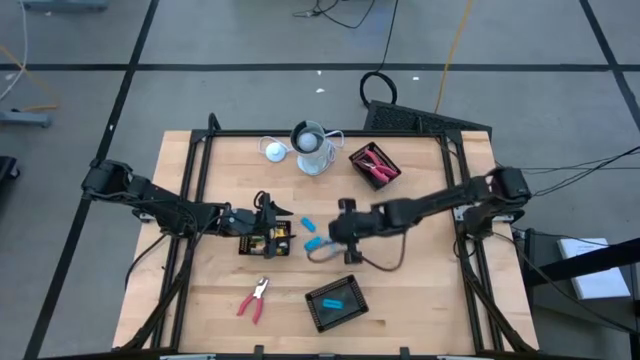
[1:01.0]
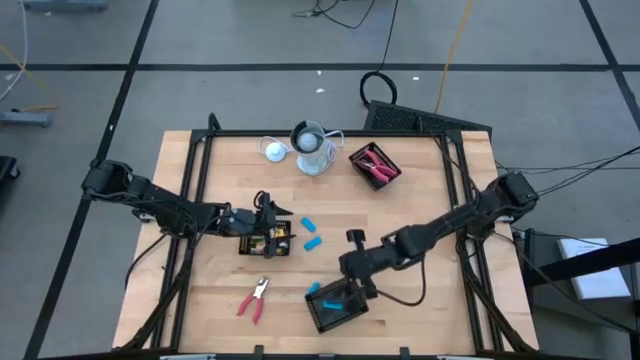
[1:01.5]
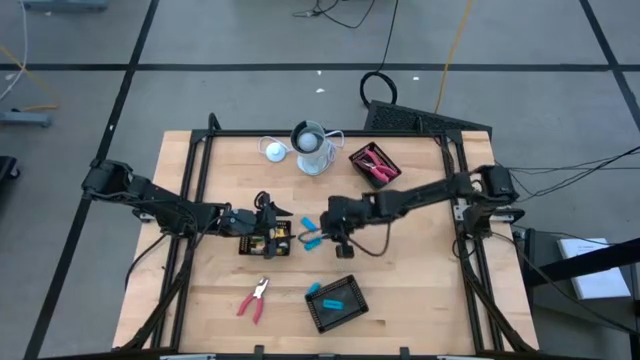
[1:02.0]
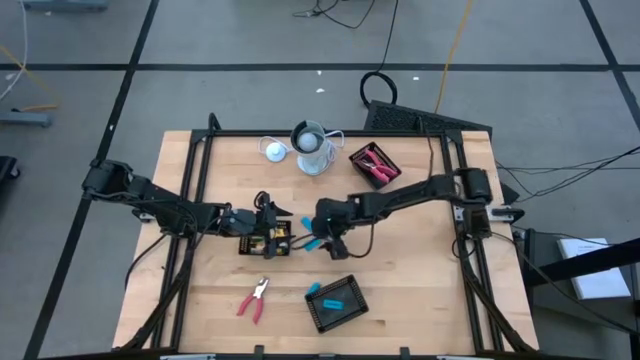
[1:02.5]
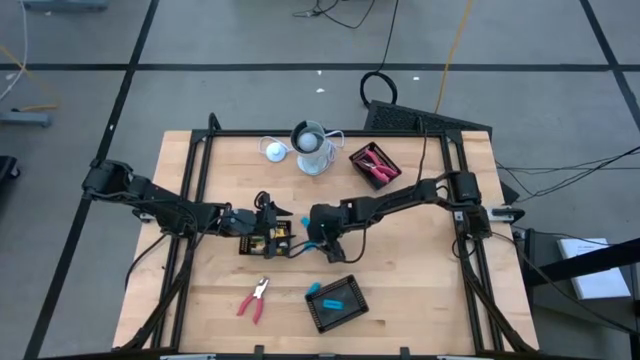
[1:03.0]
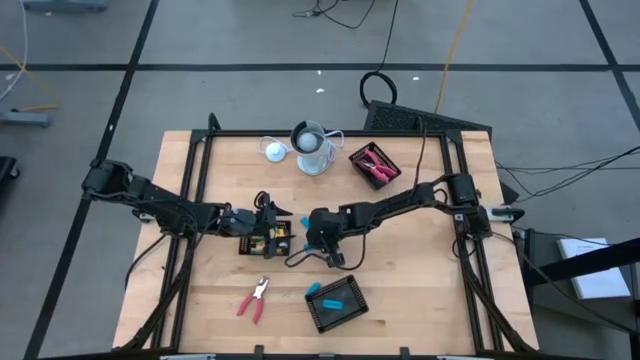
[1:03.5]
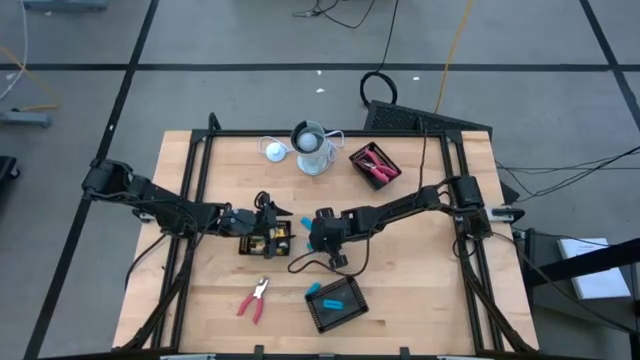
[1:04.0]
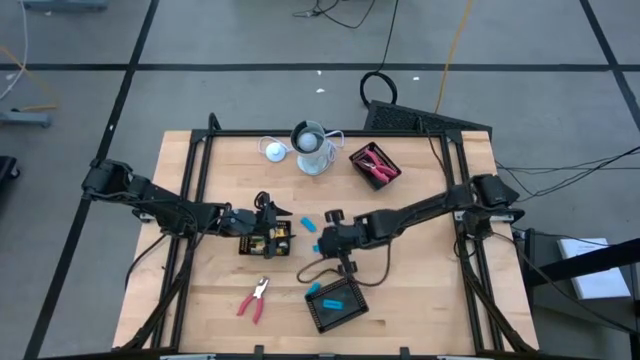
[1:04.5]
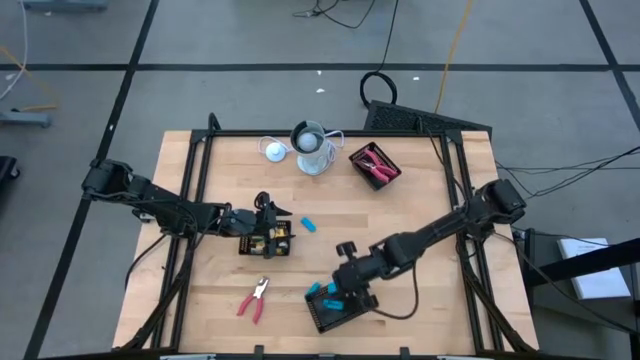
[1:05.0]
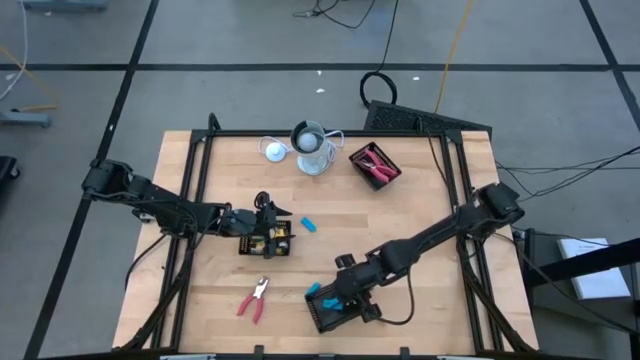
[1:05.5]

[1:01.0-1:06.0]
Task: Pick & Place School Supplies
Put the blue eraser into the bottom black bin

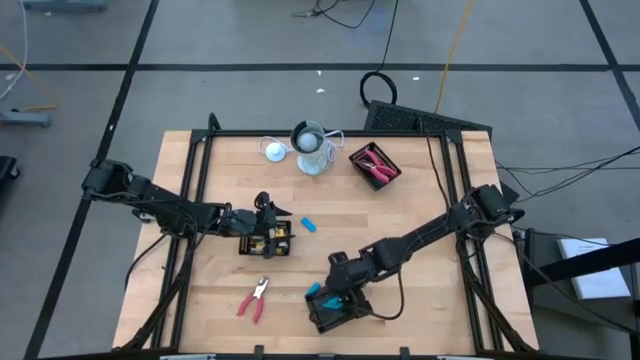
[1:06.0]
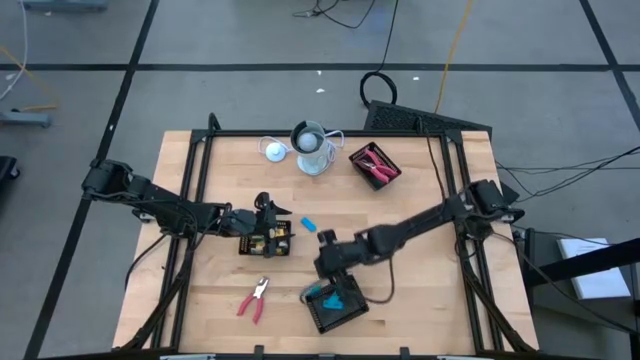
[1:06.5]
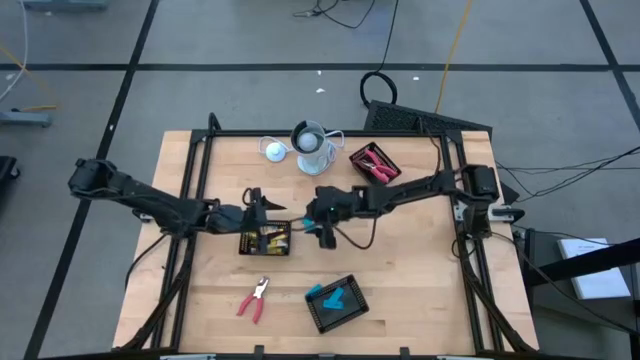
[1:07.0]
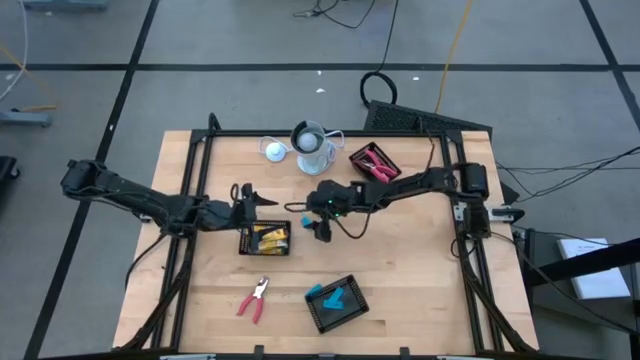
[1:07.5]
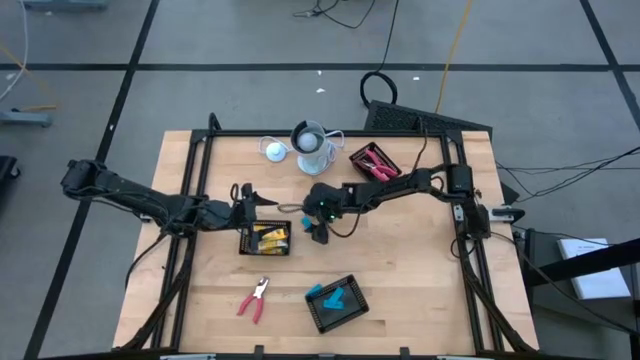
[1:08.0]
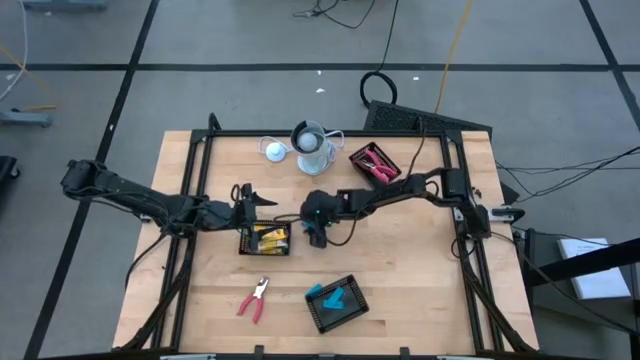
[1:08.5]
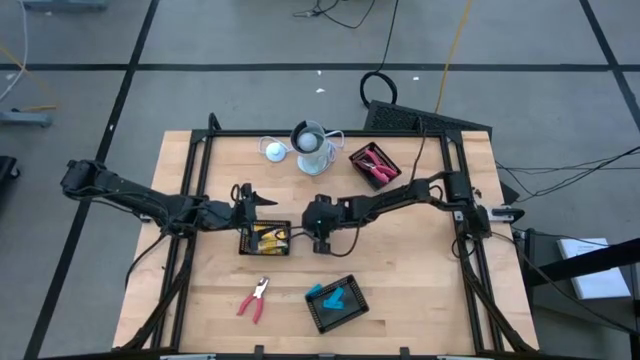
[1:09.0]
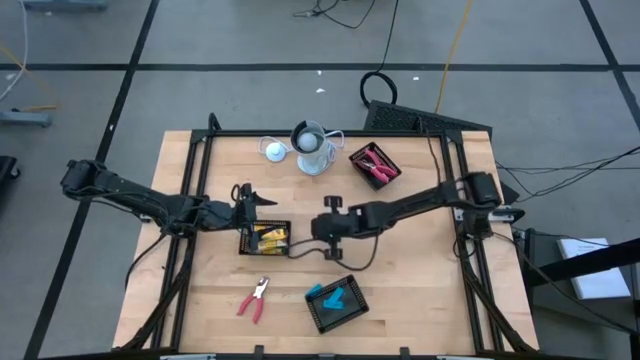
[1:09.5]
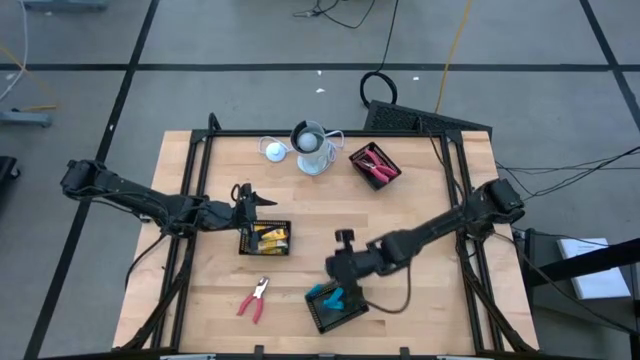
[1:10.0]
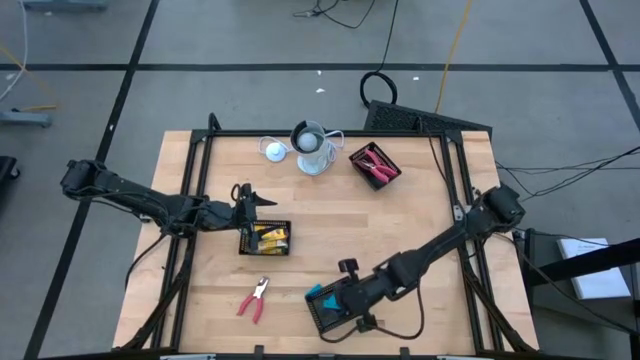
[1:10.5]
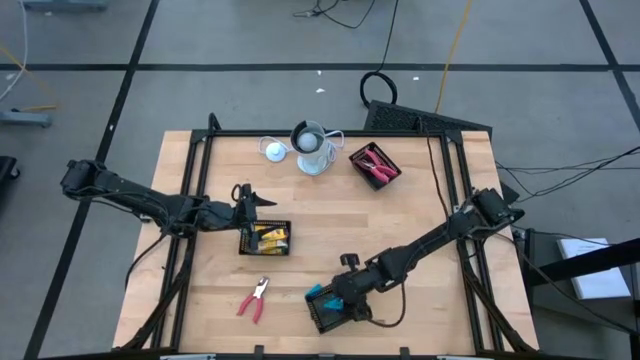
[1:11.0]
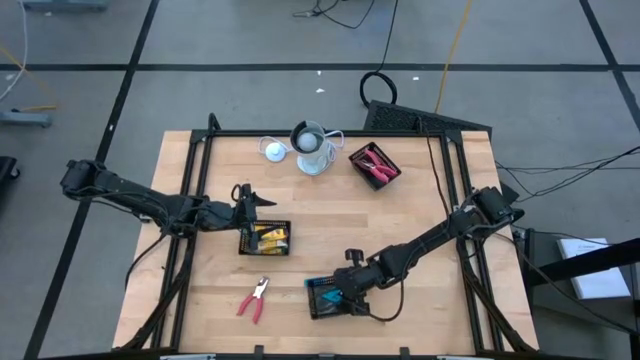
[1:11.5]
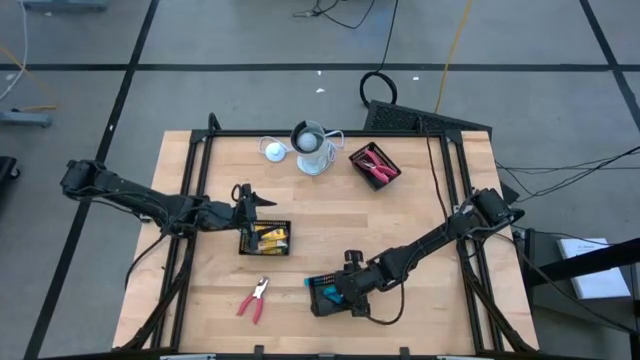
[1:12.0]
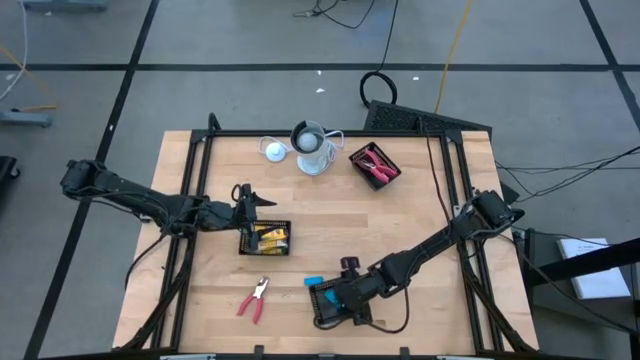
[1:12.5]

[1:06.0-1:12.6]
Put the blue eraser into the bottom black bin

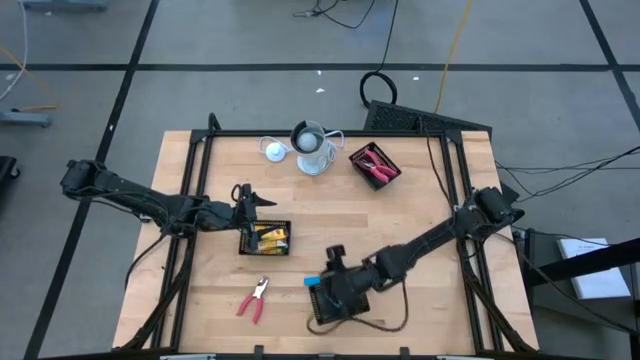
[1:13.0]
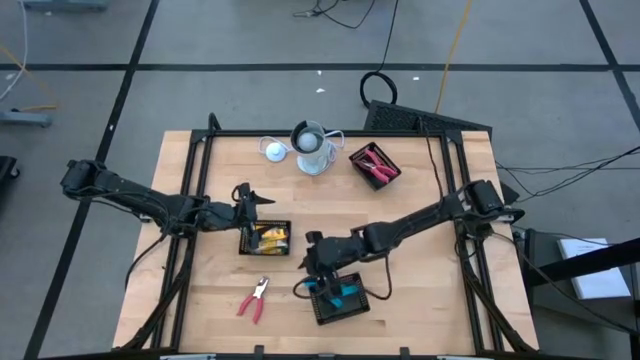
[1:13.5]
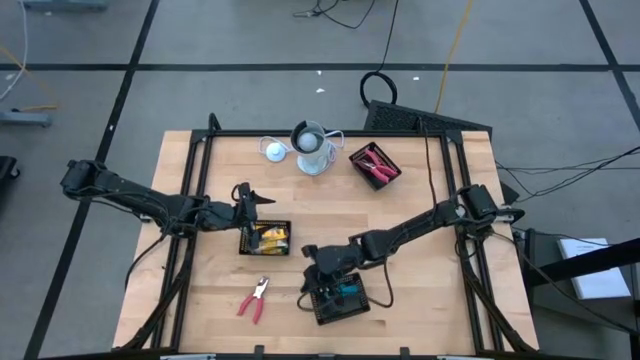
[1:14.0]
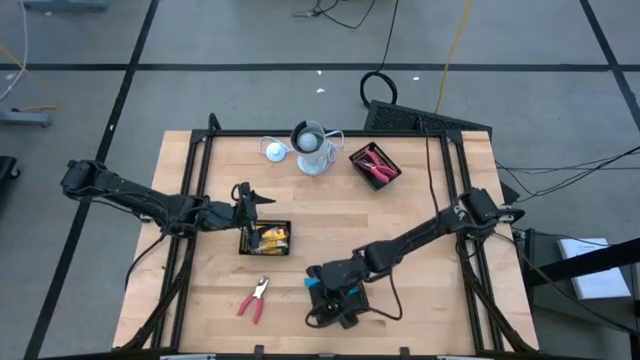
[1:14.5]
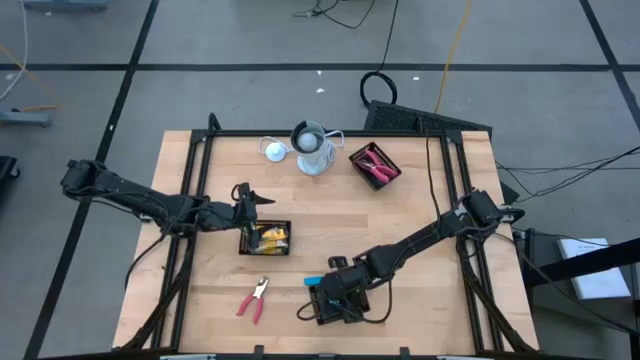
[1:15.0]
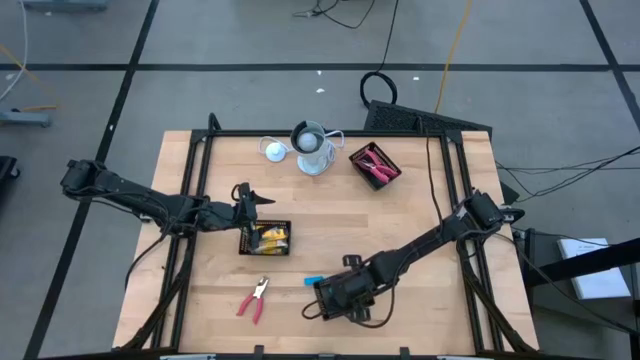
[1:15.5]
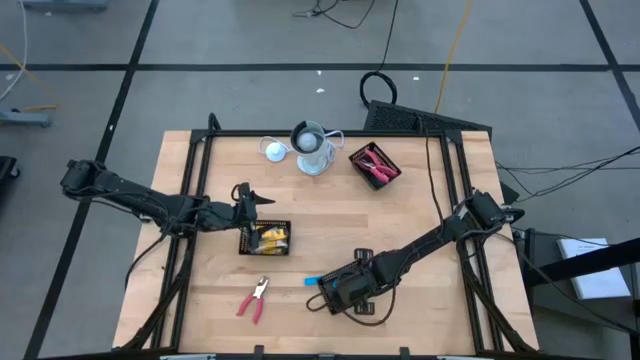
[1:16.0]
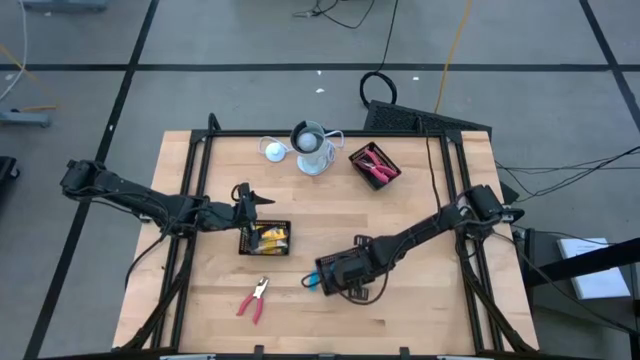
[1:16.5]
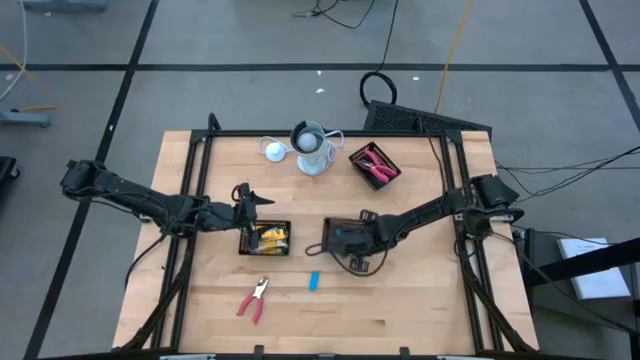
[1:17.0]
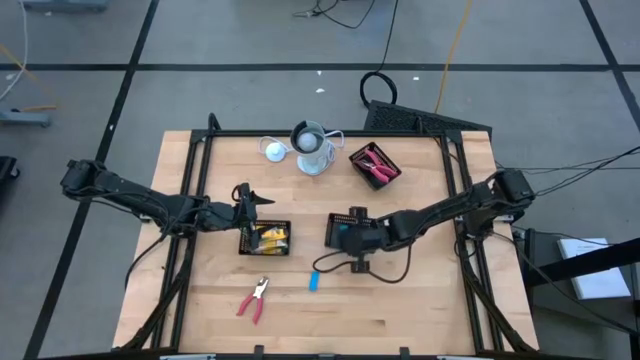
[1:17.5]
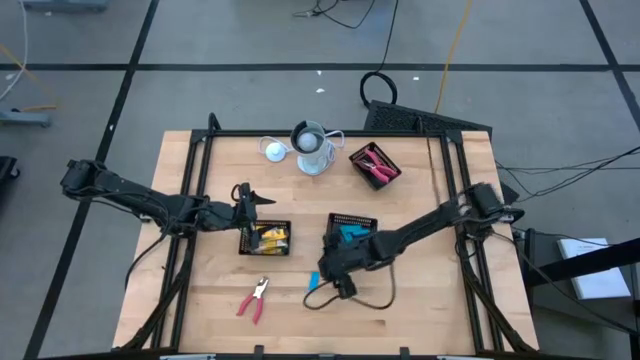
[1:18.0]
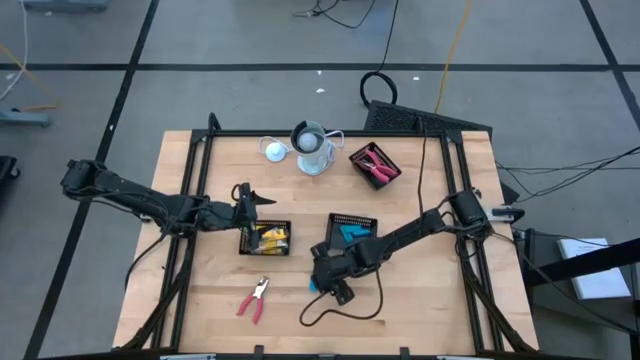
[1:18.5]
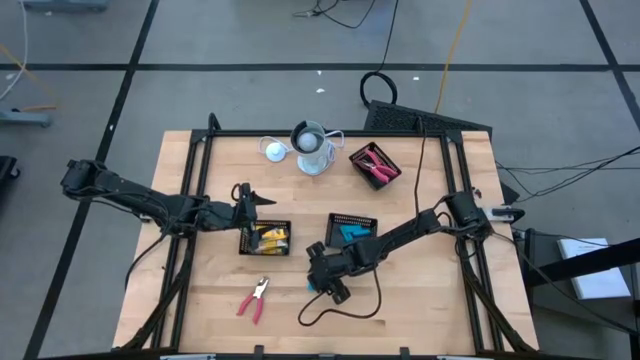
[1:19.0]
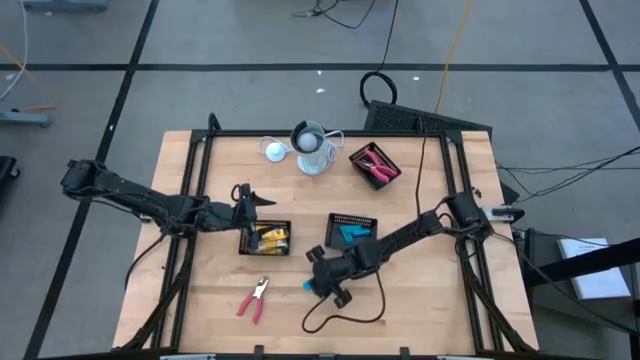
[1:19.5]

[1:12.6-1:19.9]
Put the blue eraser into the bottom black bin

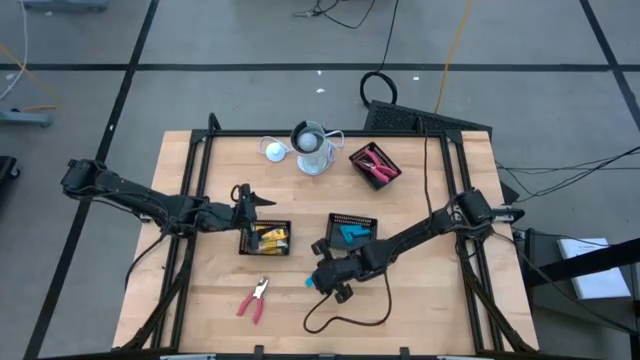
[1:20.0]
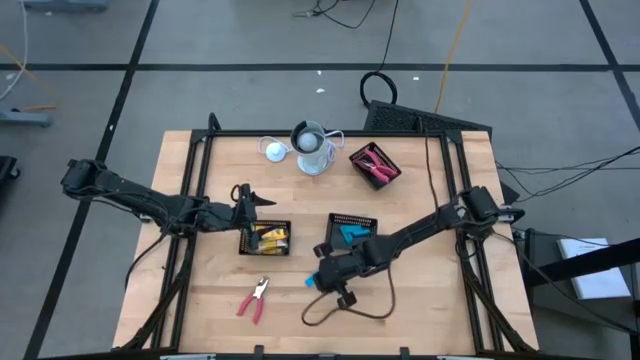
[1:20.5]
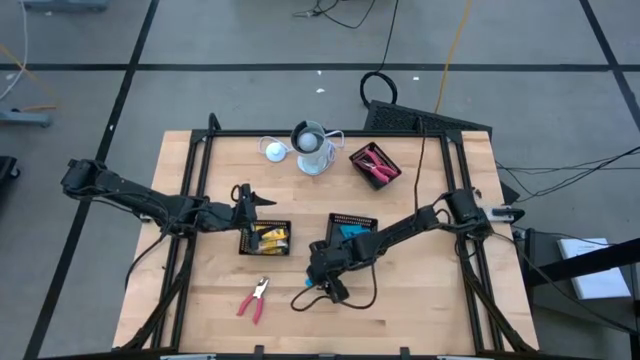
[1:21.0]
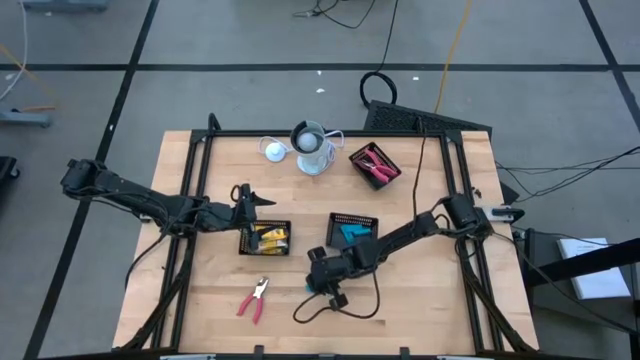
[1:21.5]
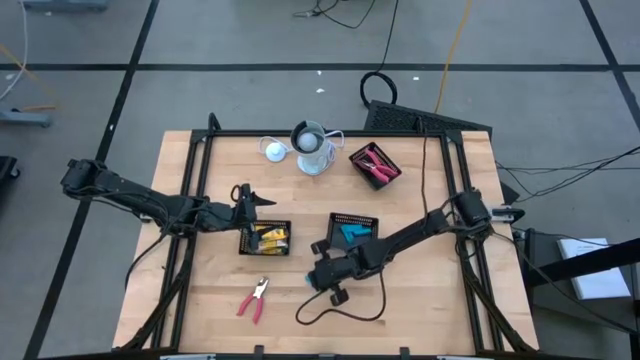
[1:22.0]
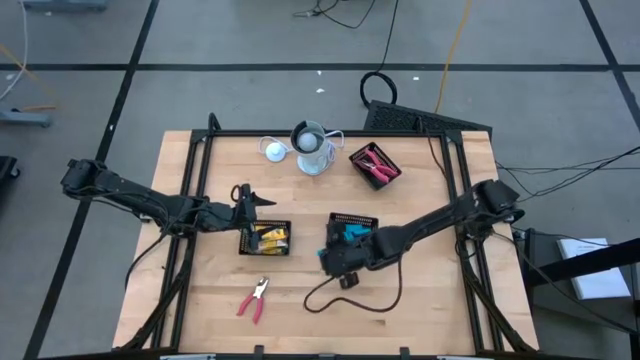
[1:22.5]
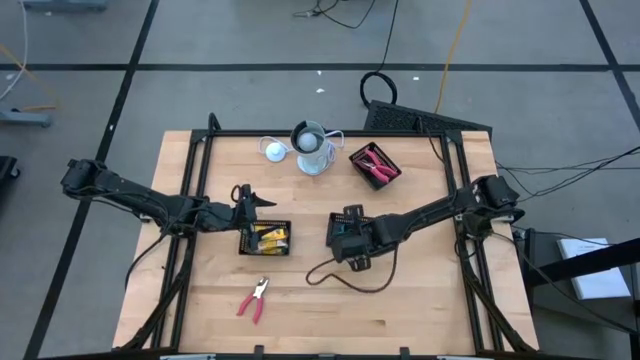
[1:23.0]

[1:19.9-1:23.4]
Put the blue eraser into the bottom black bin
